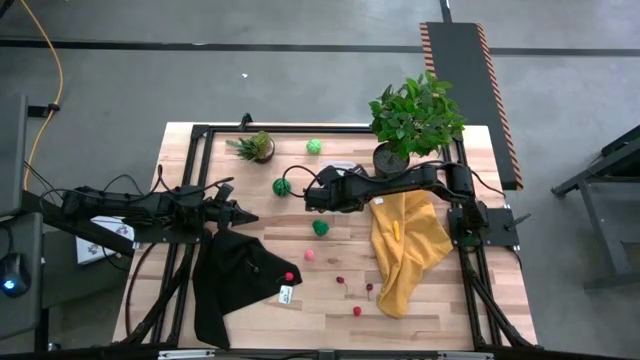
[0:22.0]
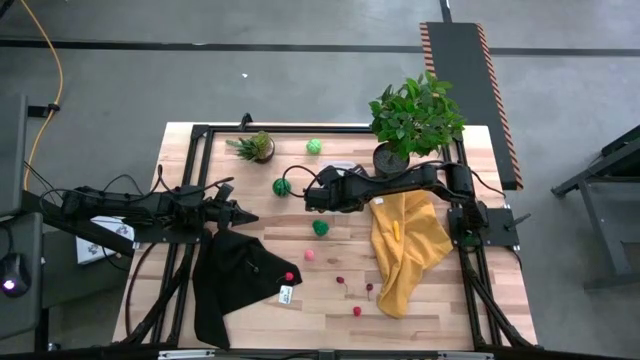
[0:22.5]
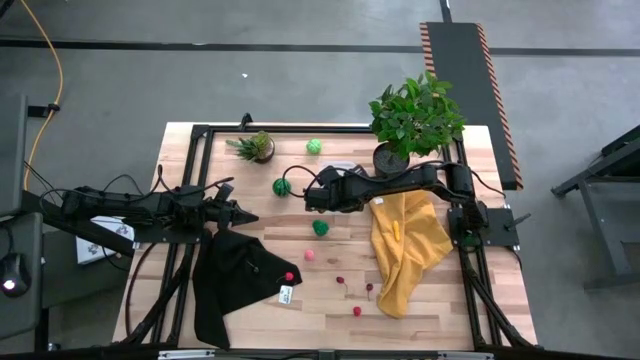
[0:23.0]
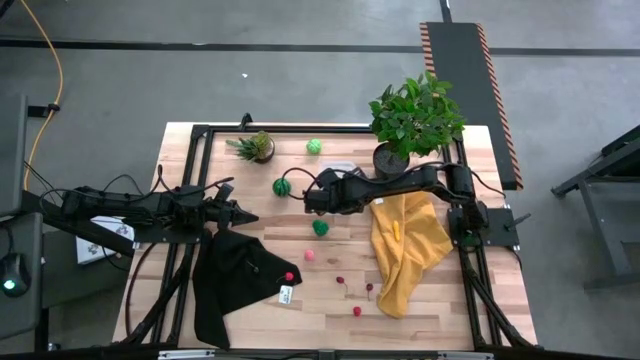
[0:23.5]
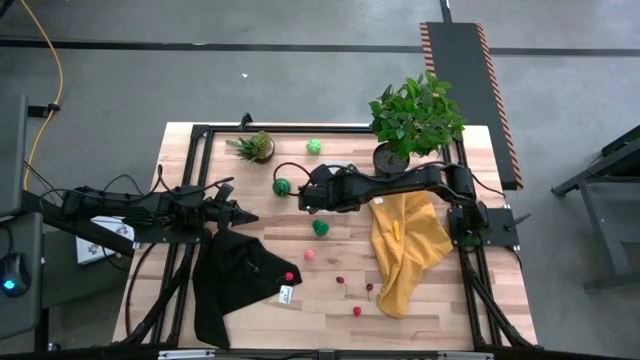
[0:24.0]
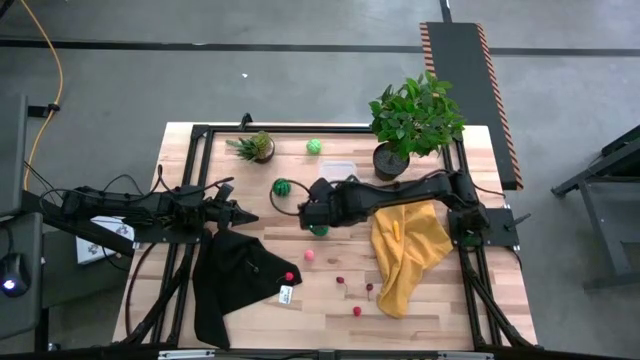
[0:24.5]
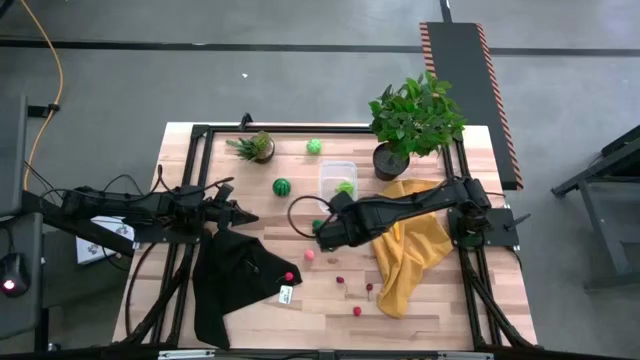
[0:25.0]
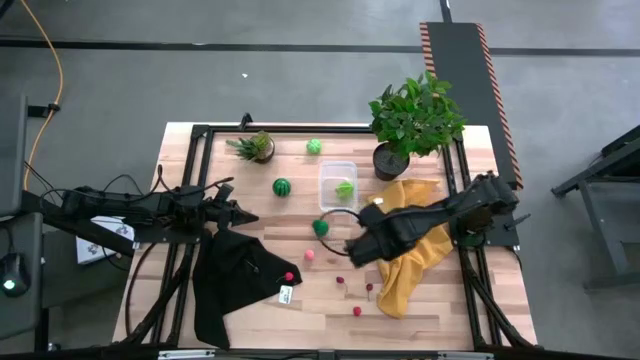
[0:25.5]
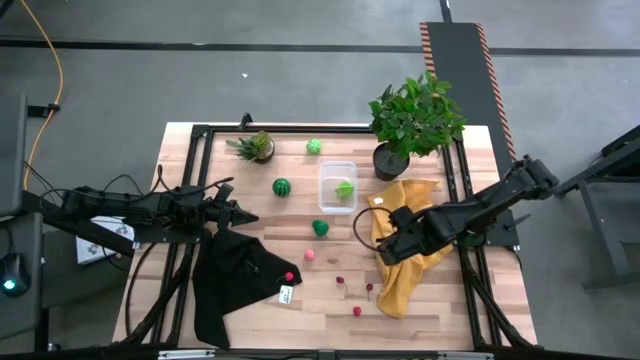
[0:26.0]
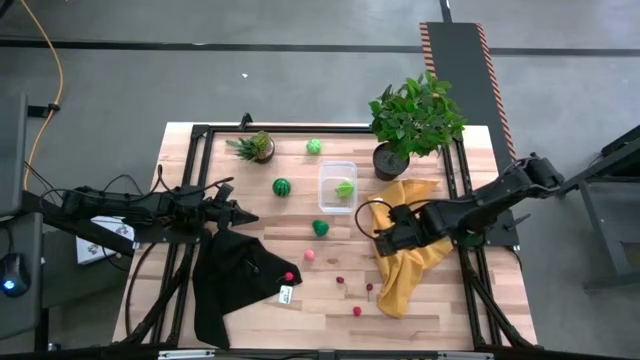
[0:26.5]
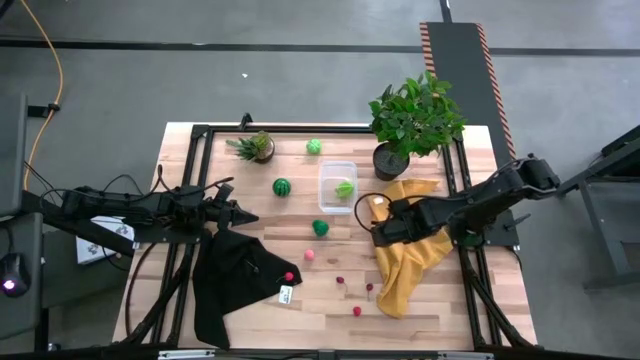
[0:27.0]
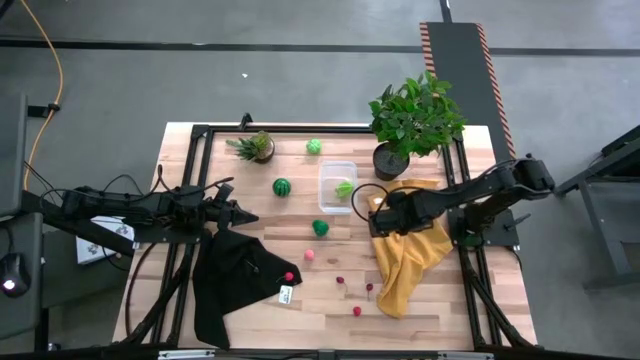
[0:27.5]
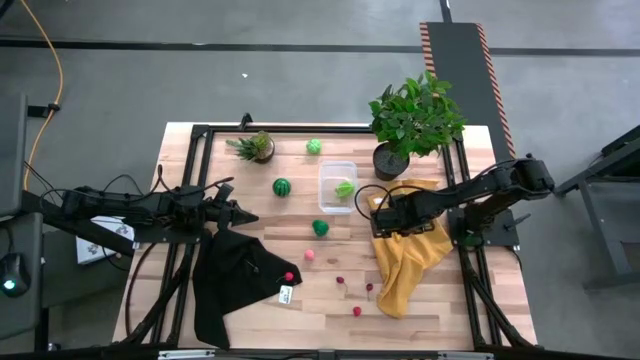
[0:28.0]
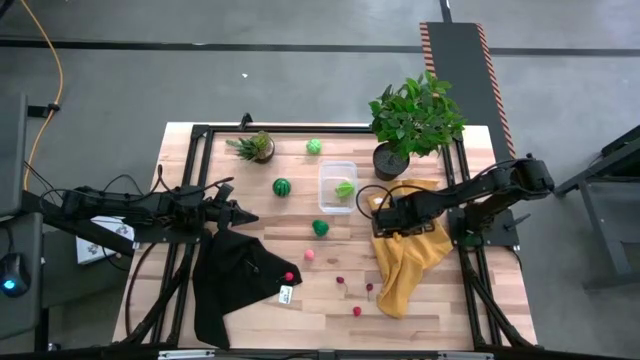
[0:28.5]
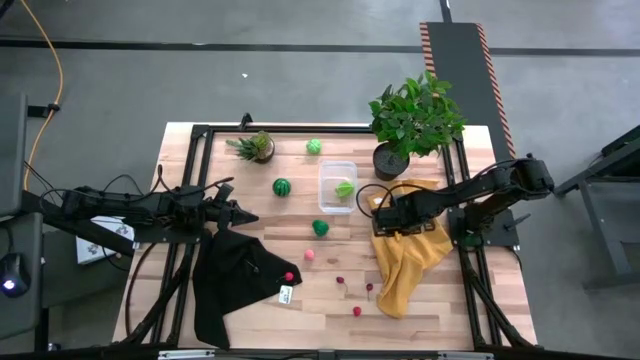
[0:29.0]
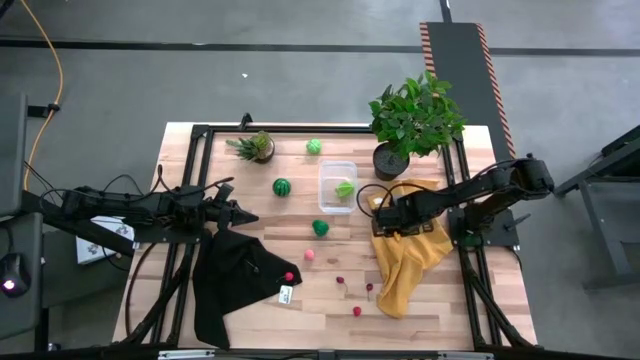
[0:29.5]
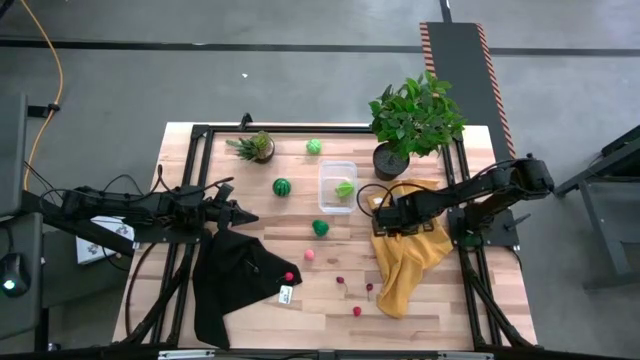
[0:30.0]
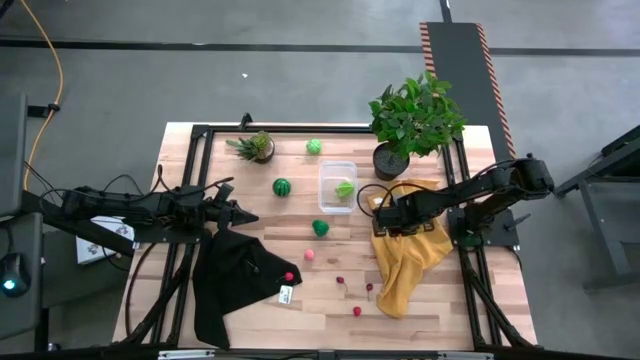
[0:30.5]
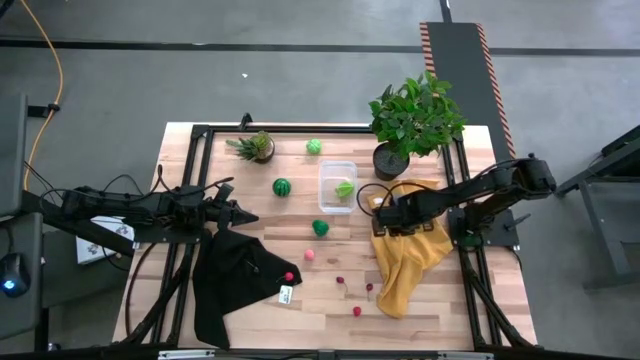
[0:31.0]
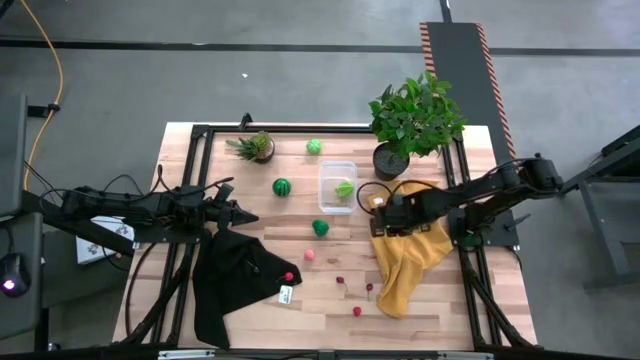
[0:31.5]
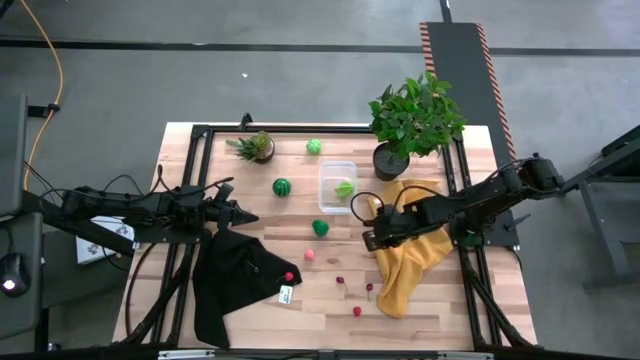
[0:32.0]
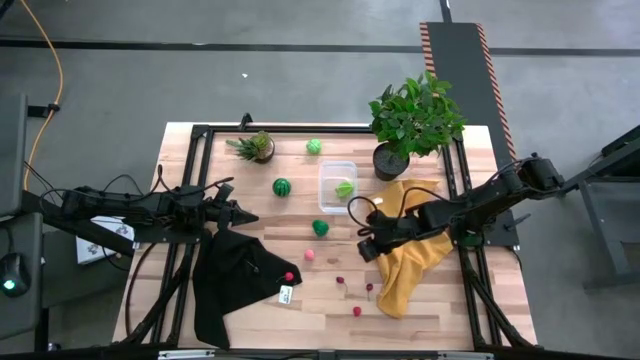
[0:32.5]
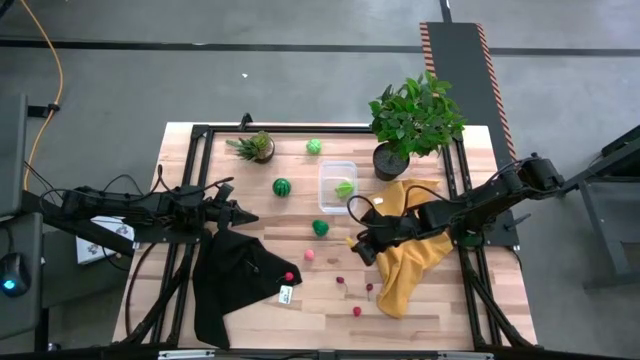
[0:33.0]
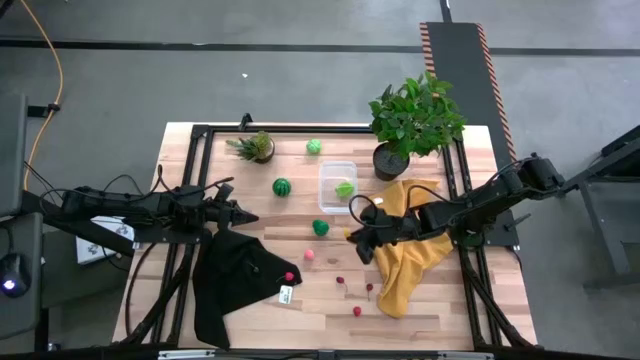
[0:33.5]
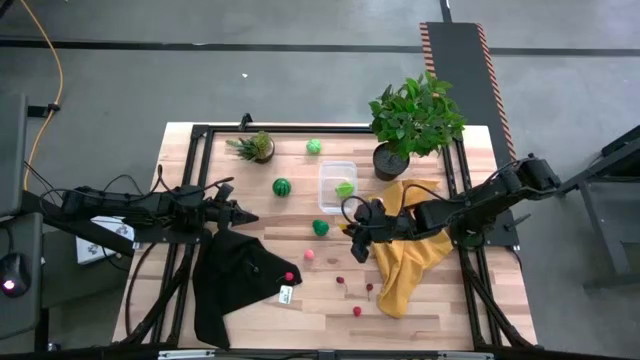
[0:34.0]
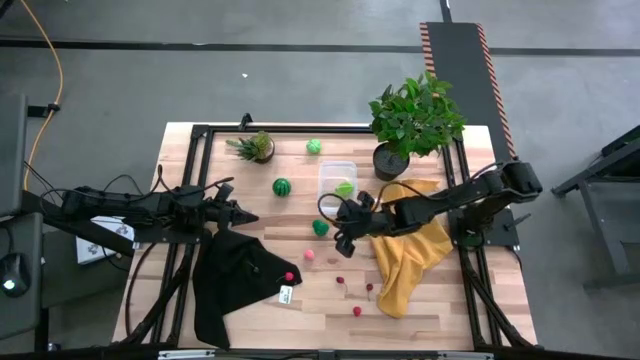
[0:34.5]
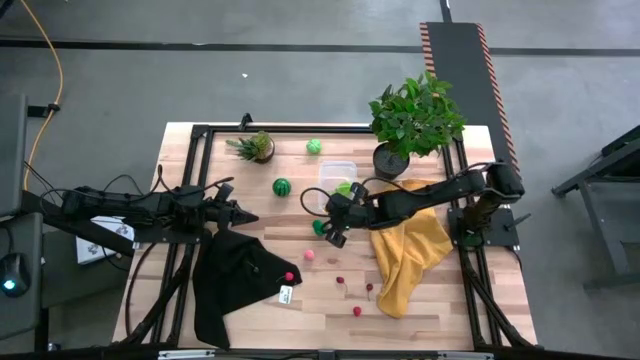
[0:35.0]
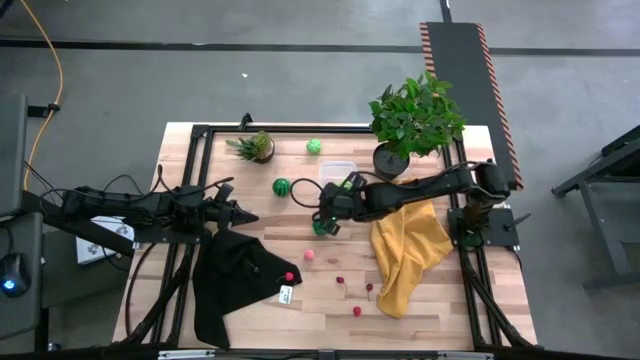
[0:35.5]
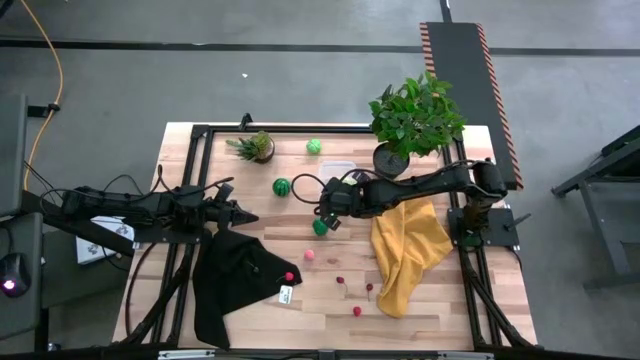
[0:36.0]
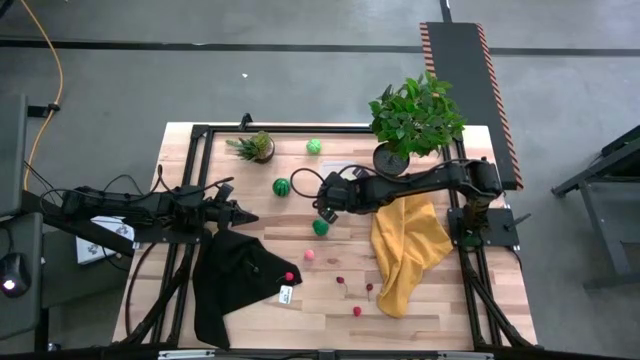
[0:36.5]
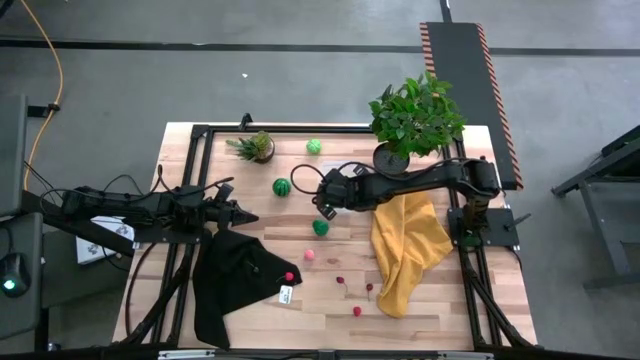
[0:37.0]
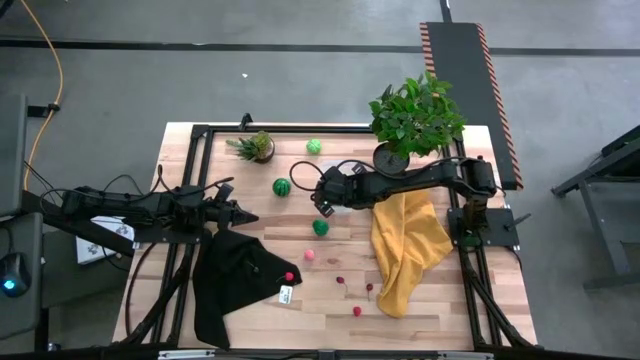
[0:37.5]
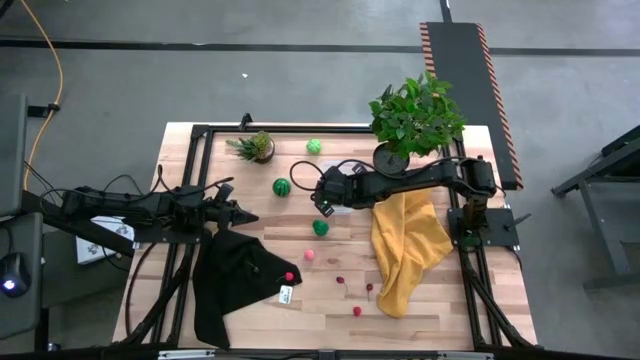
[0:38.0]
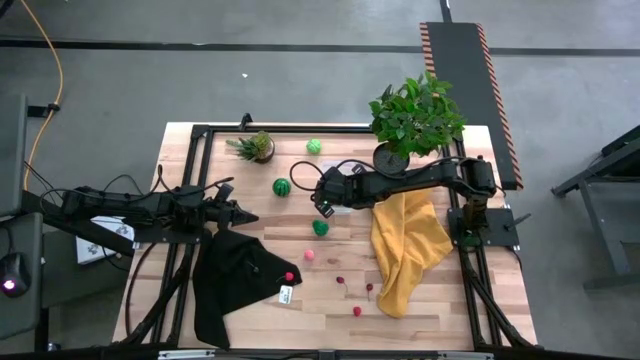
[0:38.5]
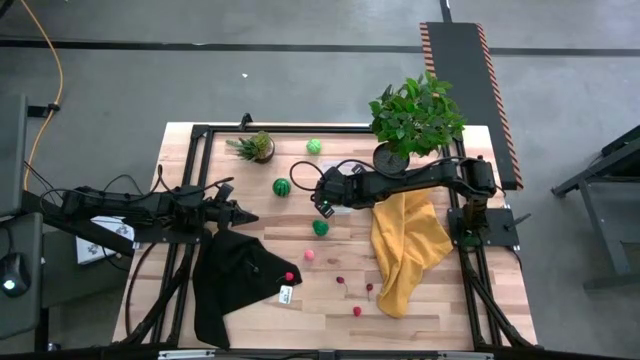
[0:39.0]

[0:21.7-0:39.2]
Task: Pick and placing Produce into tupperware
Put the corn into the transparent bin

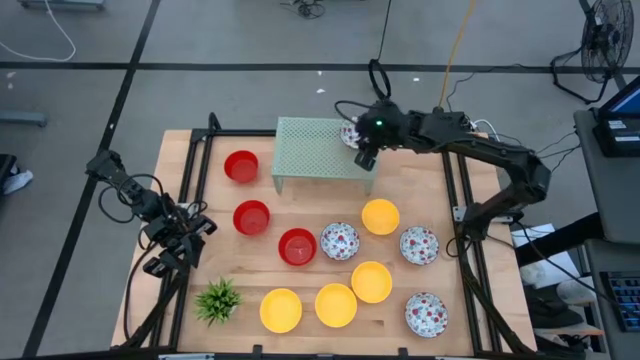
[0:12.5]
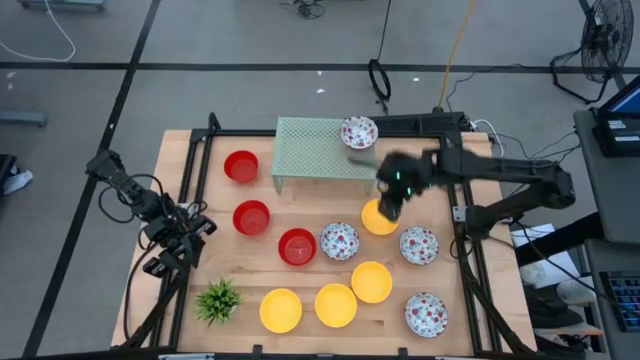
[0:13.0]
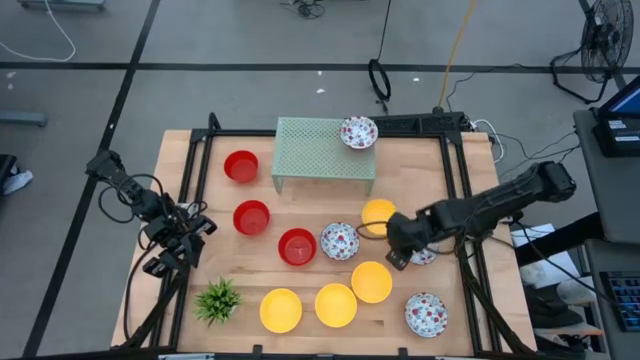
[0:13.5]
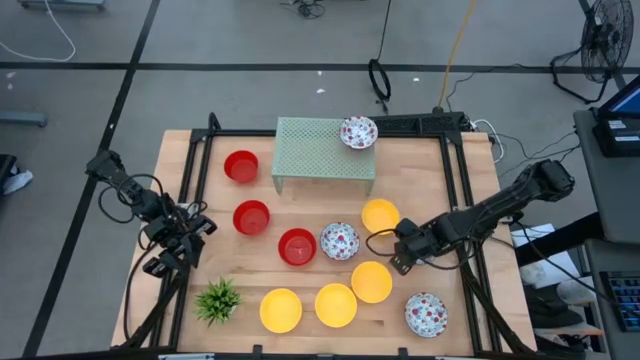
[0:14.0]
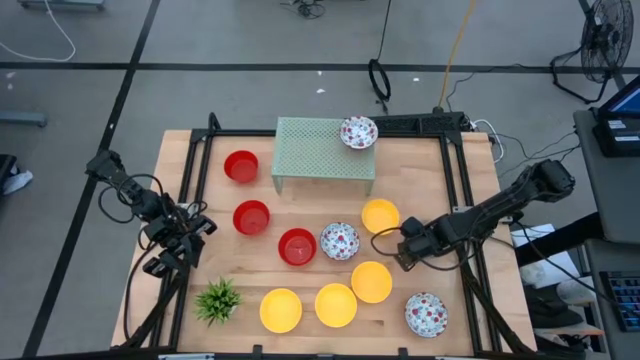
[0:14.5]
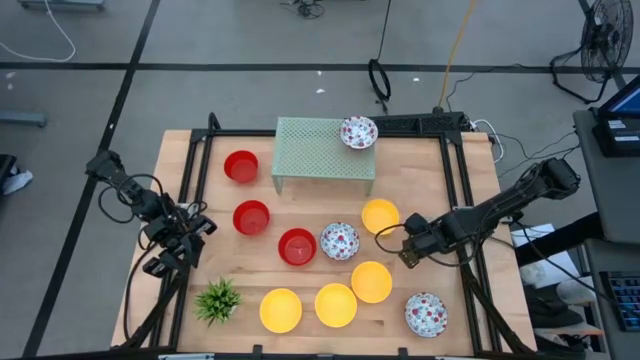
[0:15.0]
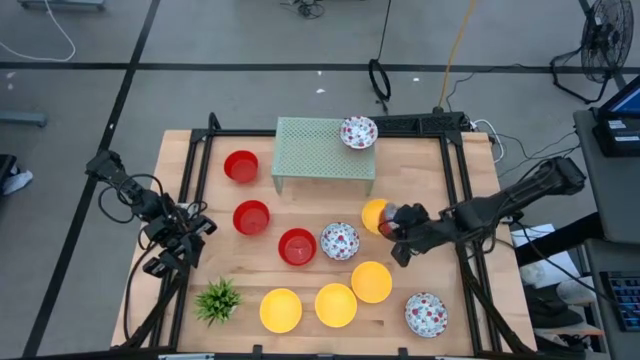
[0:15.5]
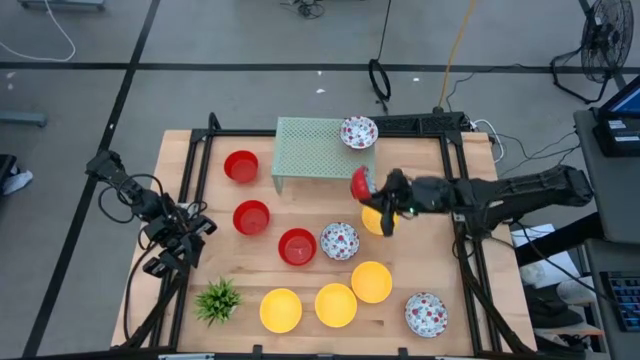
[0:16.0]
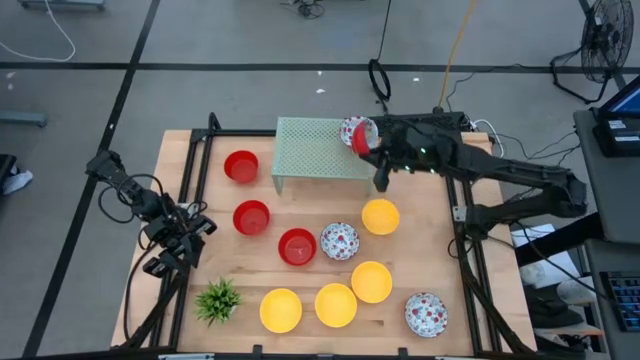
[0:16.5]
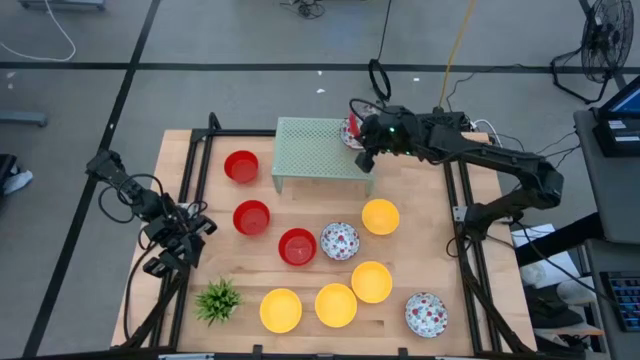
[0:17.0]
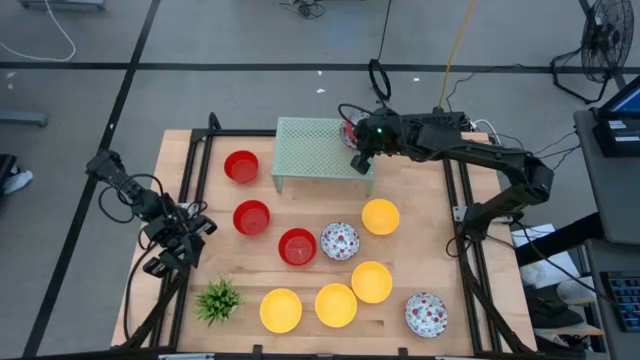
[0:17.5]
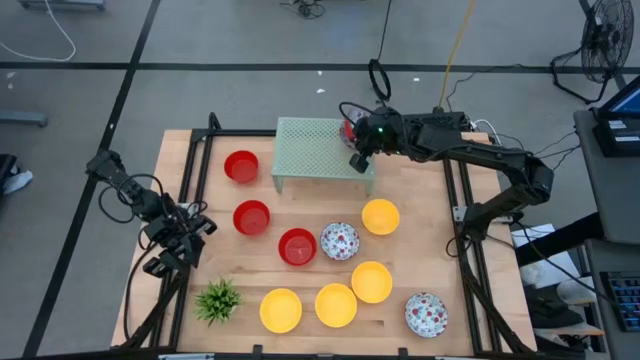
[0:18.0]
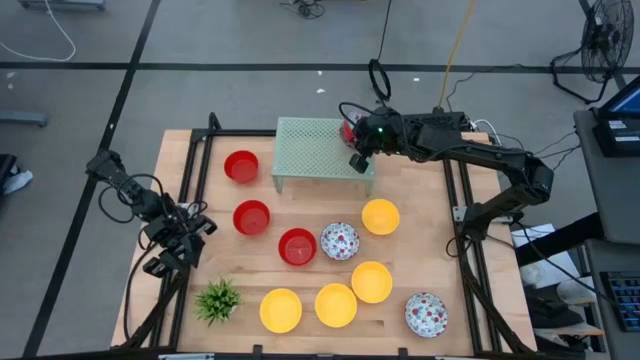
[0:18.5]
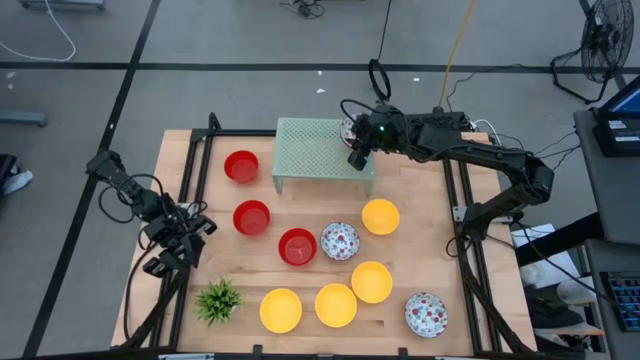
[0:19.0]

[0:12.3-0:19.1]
Task: Pick & Place Mini bowls
Stack the red patterned bowl on top of the red patterned bowl on the shelf
